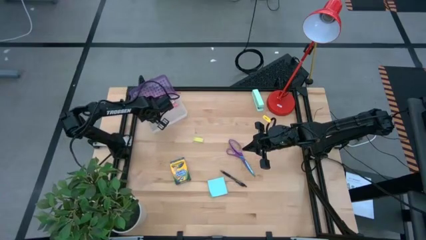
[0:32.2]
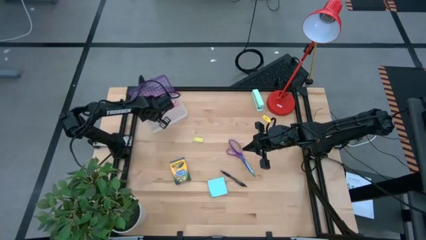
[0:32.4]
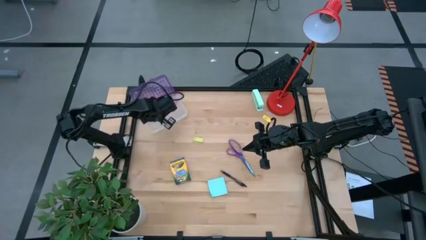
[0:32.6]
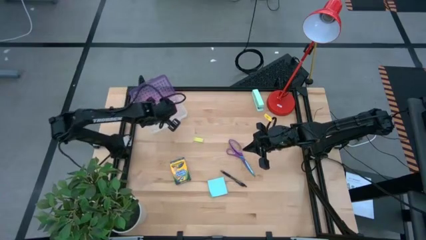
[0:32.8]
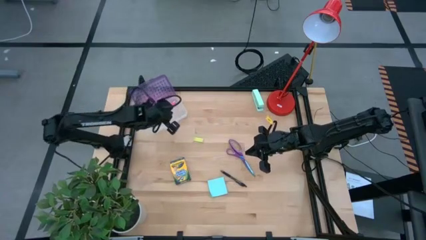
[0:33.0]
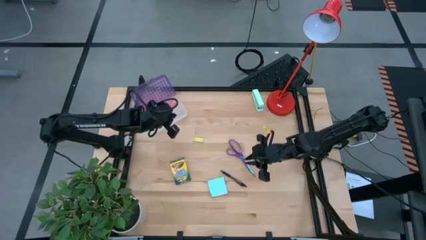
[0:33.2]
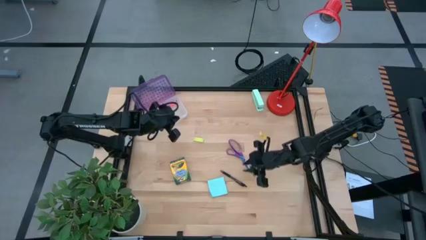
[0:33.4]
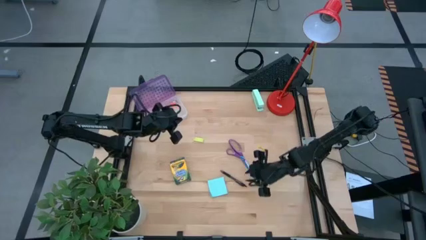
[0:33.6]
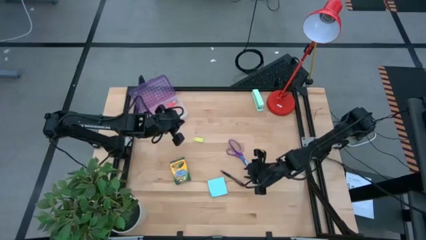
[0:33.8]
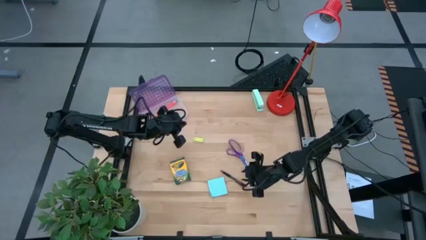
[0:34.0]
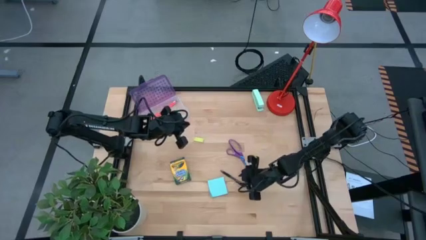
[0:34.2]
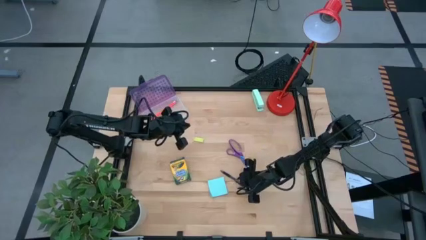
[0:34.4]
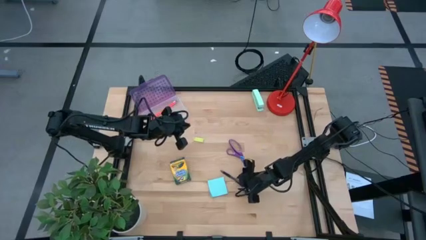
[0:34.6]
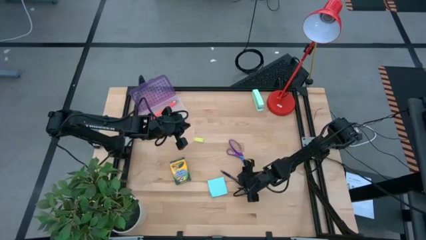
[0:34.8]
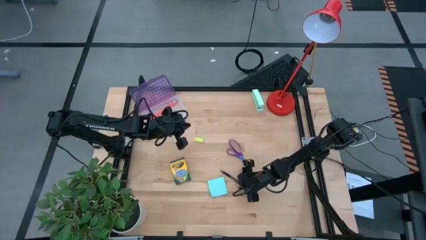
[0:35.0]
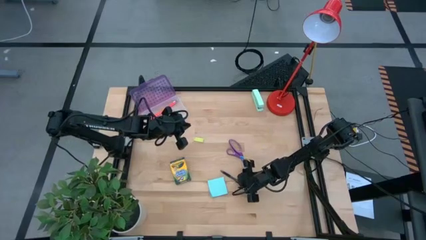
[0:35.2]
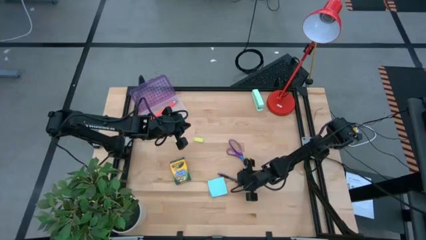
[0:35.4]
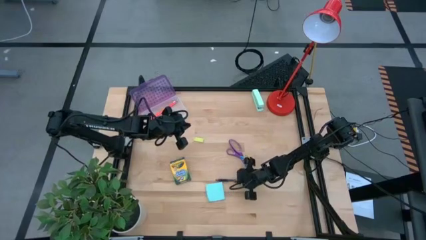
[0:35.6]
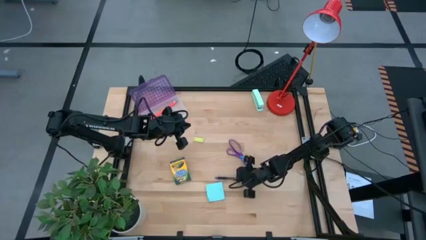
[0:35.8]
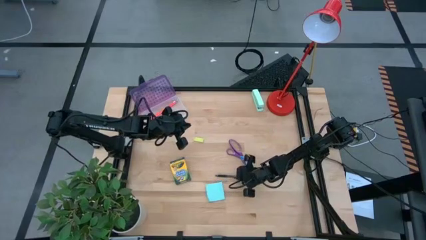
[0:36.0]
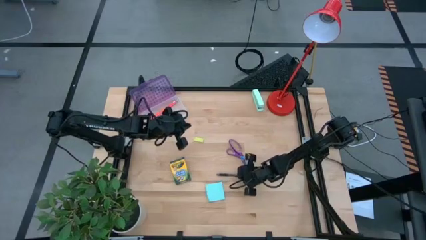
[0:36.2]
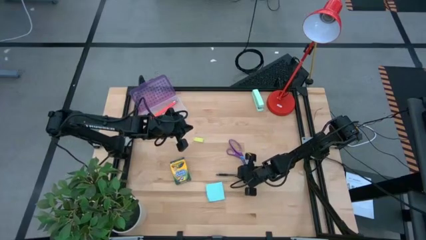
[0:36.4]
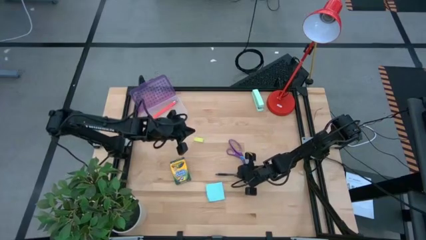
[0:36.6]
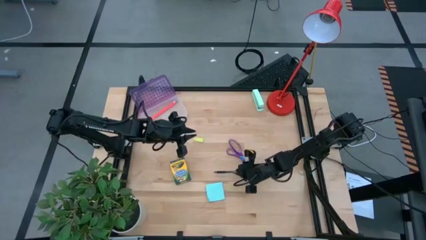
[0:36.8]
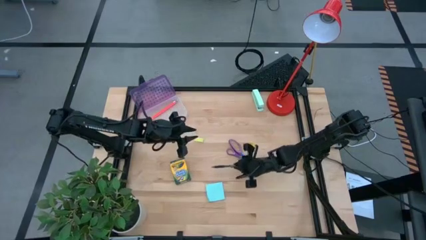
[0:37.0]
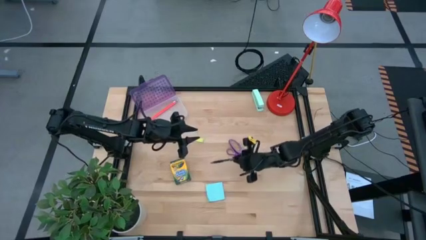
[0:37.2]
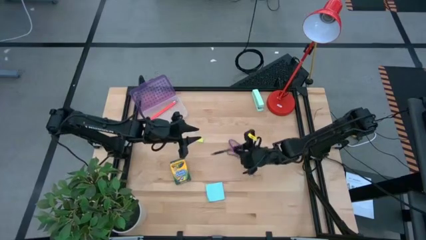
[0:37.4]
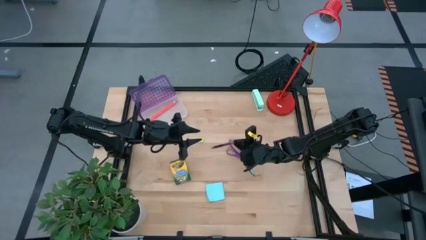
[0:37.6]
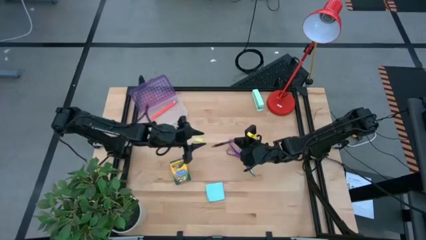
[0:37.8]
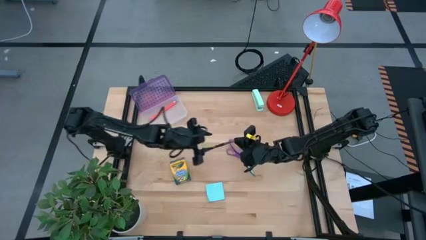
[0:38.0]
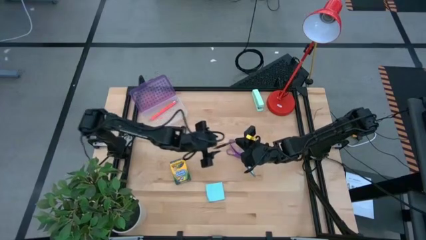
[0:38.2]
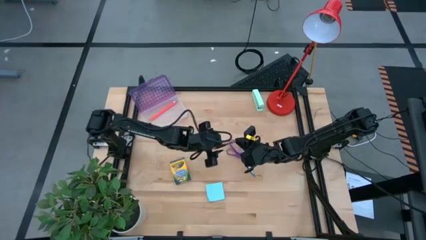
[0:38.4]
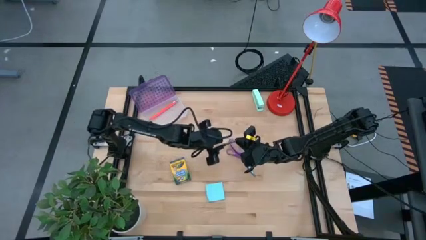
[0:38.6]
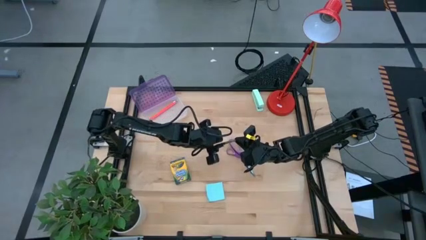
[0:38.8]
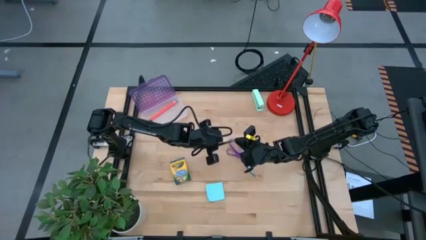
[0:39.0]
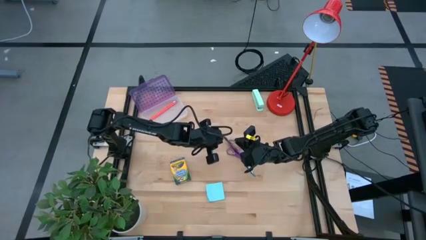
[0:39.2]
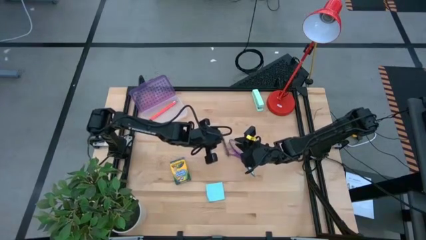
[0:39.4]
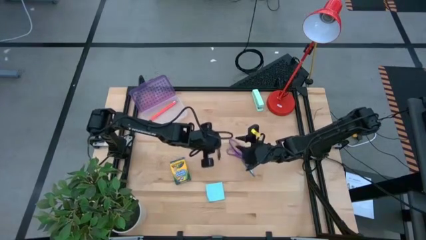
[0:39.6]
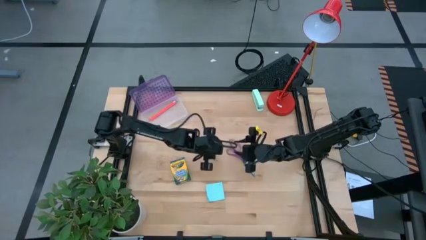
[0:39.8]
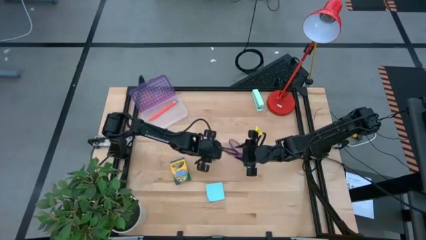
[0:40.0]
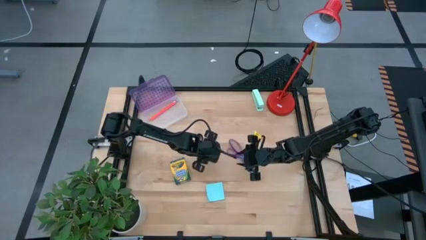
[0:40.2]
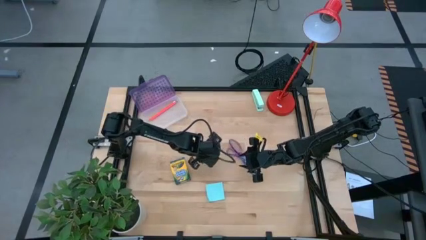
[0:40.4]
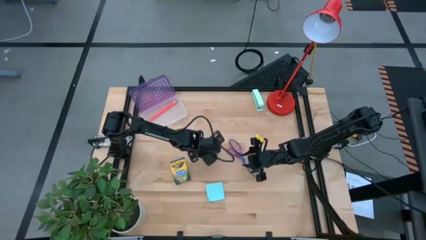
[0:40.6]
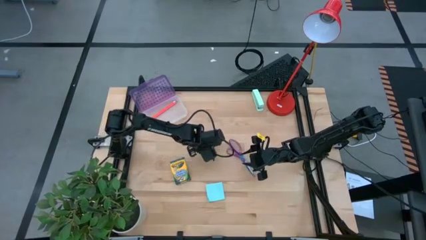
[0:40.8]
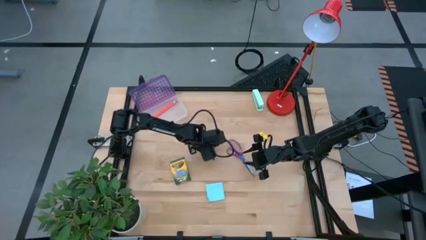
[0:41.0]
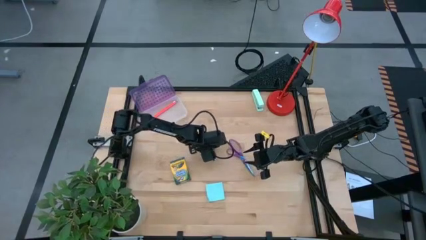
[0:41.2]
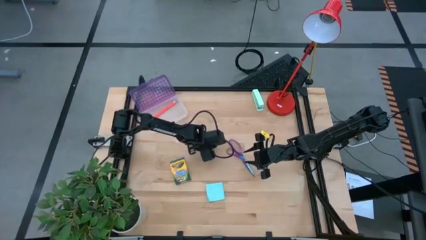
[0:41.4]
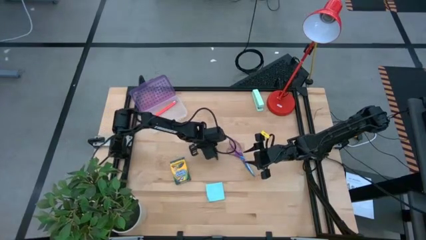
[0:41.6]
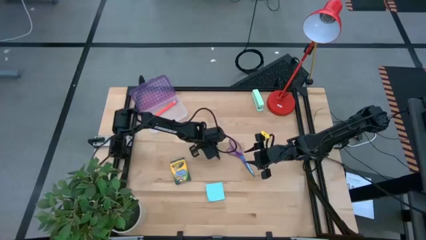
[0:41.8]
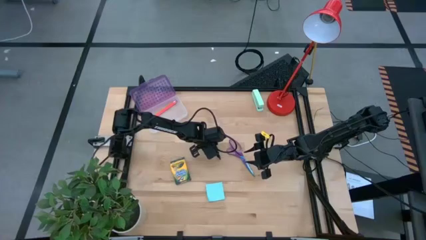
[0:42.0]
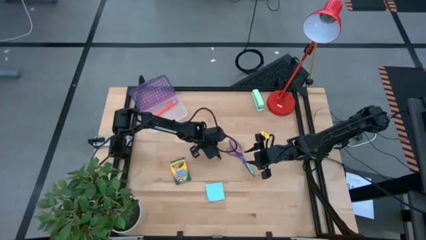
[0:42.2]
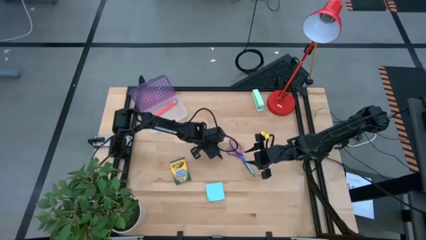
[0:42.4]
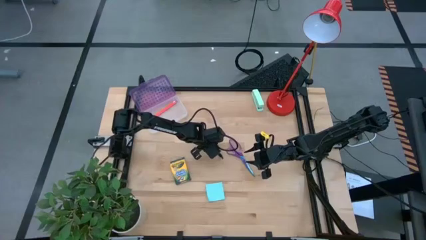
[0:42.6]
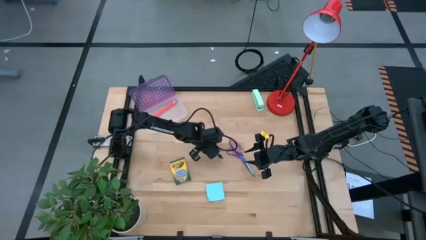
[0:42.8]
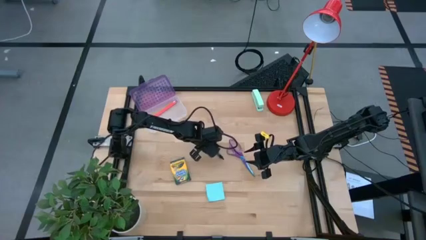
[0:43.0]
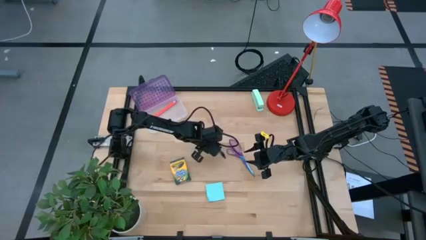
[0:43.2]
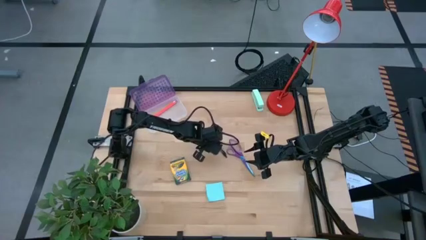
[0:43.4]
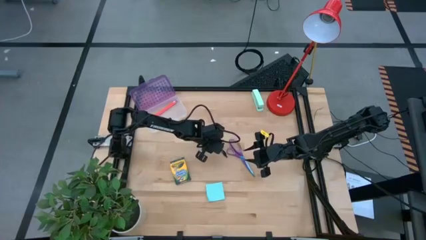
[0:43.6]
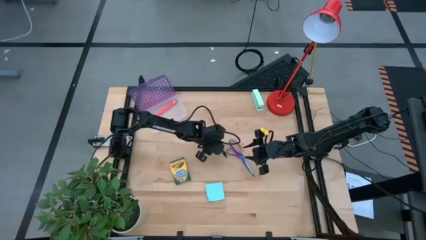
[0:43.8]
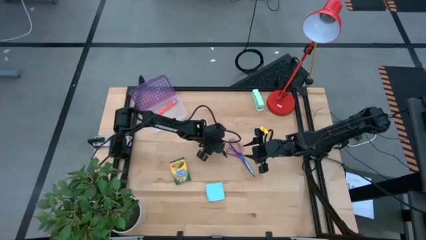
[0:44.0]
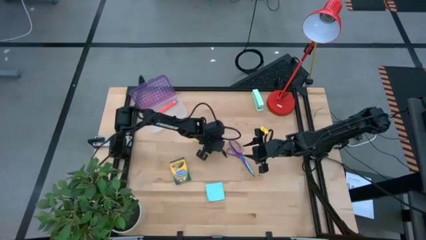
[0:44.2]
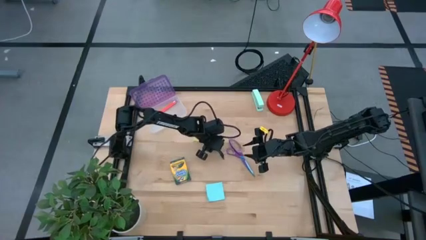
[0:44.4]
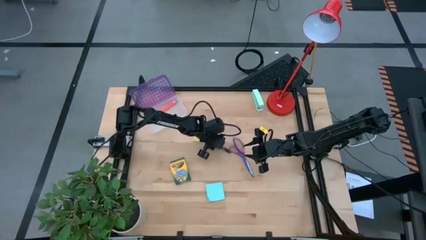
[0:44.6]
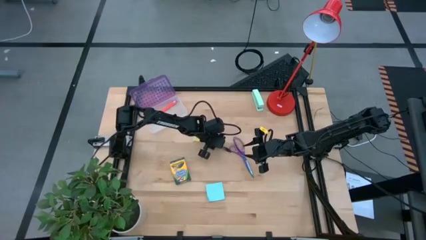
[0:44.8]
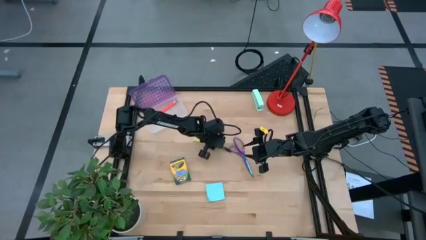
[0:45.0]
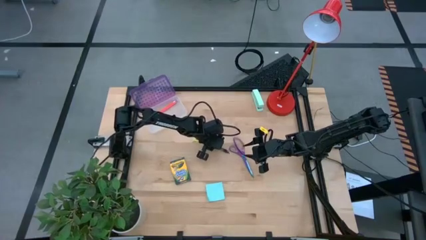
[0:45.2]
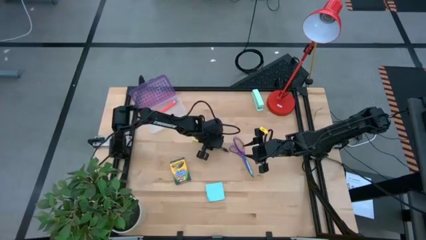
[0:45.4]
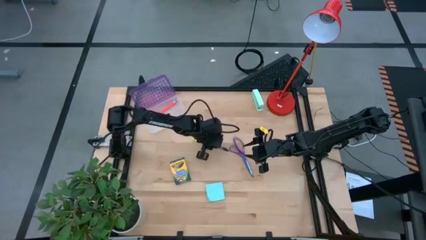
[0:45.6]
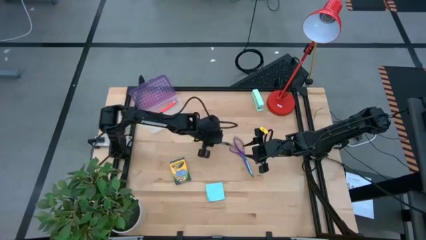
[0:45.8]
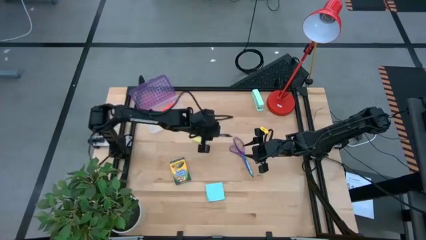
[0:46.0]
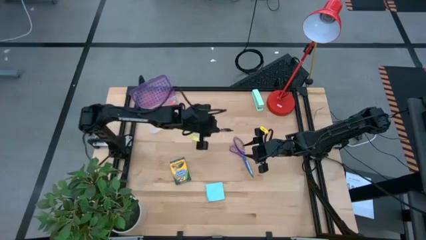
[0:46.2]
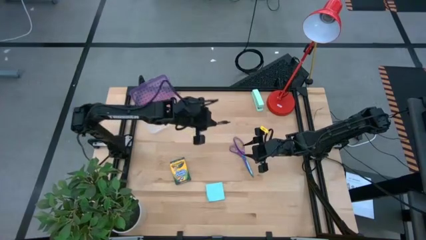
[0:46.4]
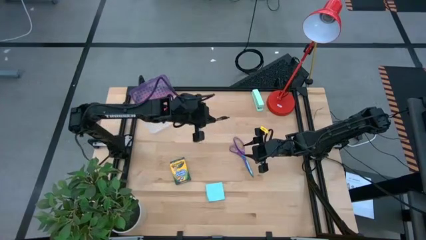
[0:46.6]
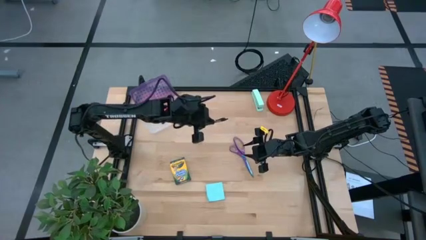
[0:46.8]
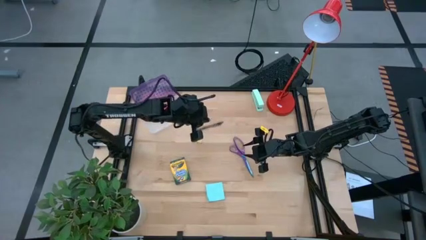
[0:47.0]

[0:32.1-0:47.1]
Task: Pack school essentials
Put the black pen into the purple supply box
